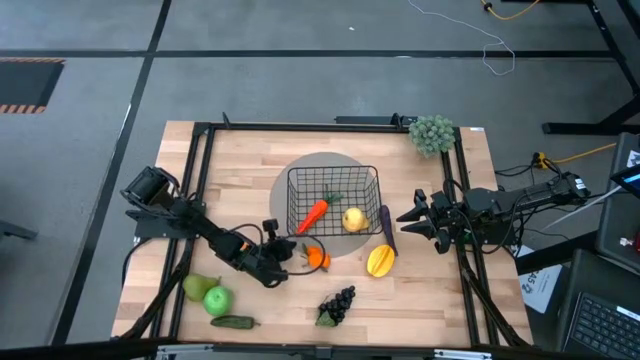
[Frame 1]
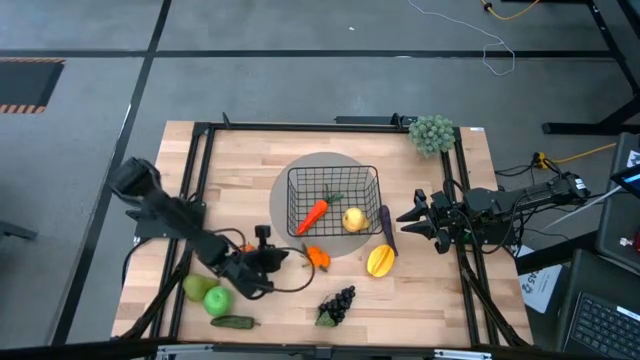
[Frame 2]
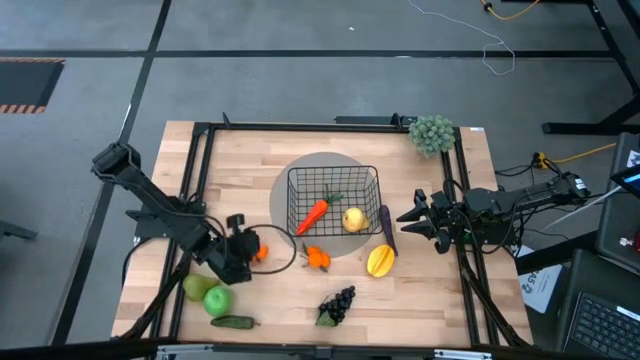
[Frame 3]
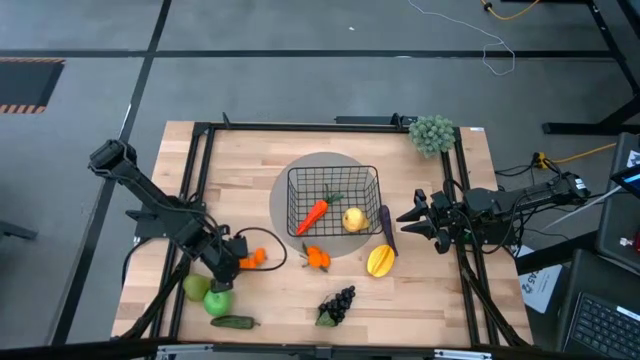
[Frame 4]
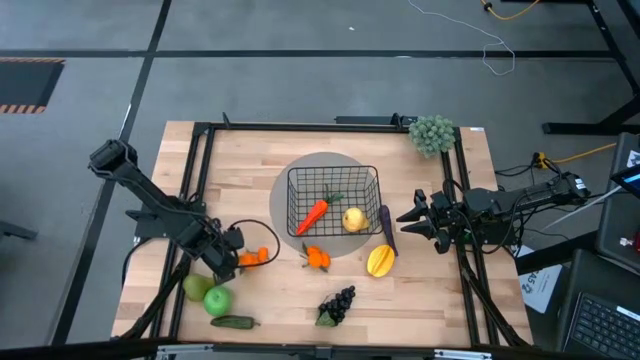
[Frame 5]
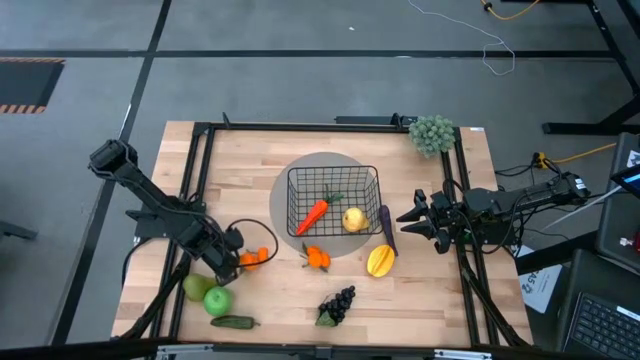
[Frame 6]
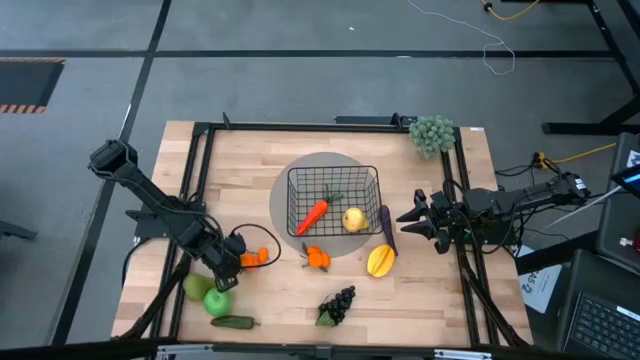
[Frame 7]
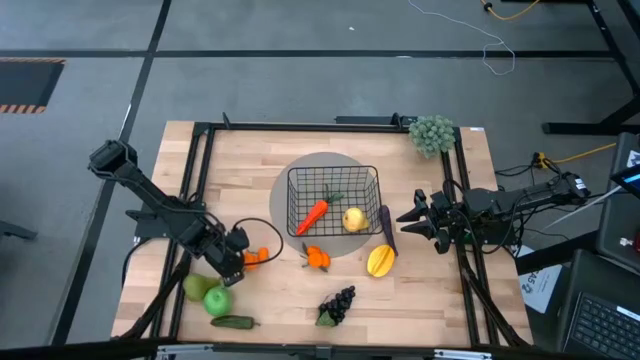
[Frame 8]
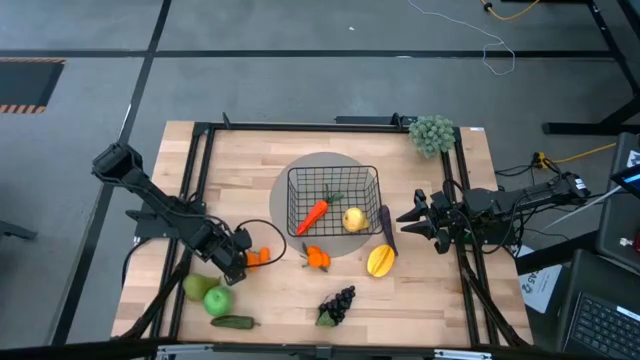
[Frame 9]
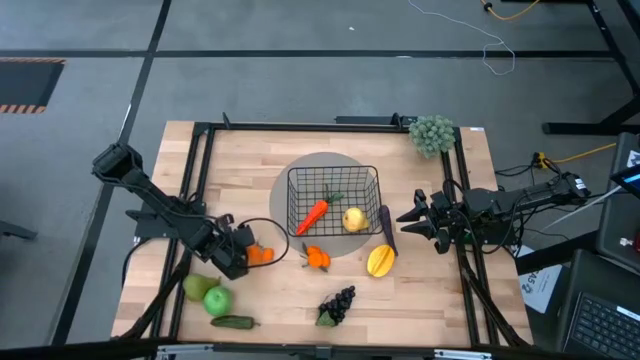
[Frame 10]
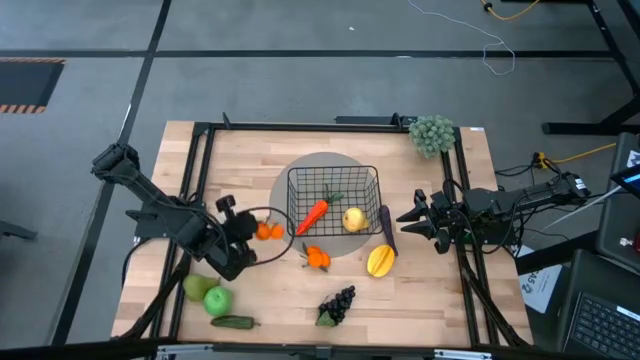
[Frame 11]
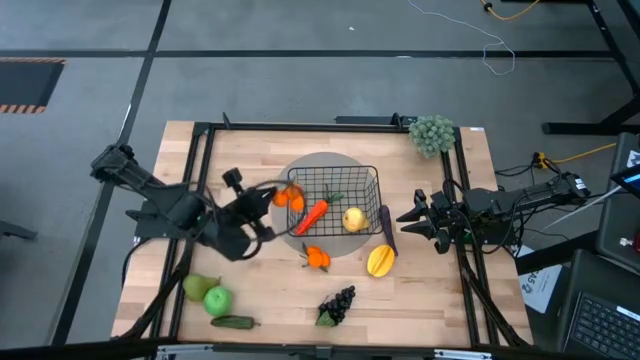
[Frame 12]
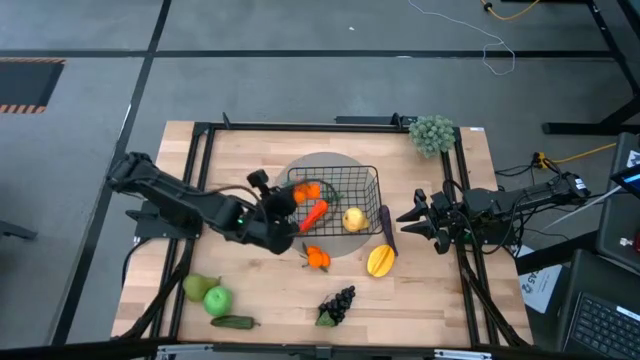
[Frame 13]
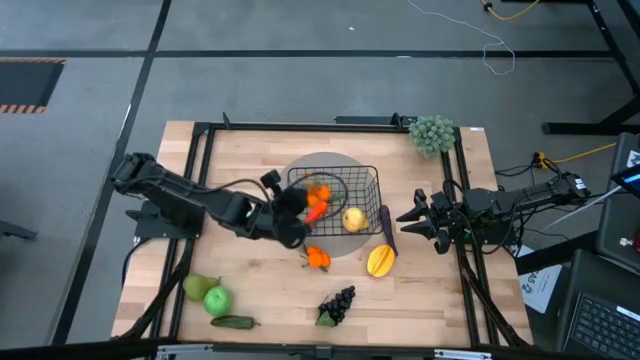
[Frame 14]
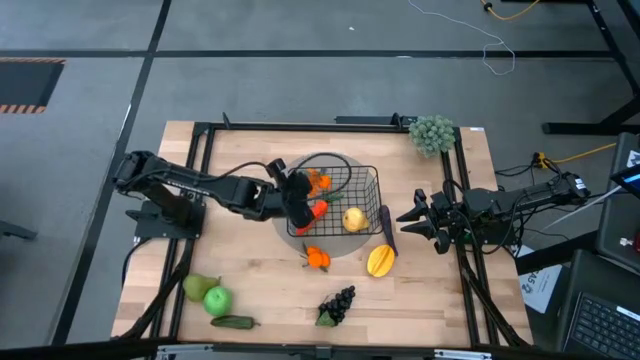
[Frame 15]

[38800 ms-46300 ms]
Task: Build produce basket
Put the left orange tangerines into the wire basket

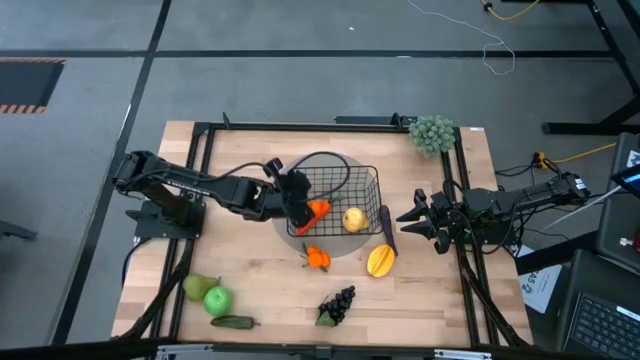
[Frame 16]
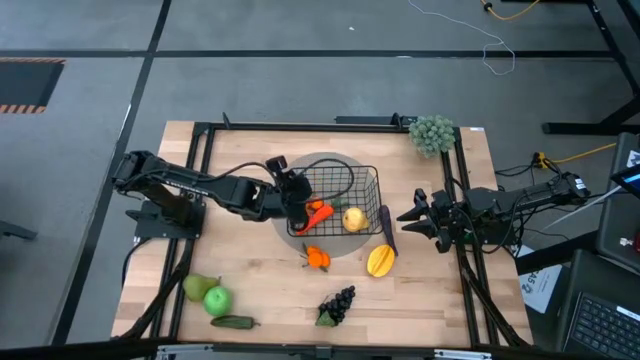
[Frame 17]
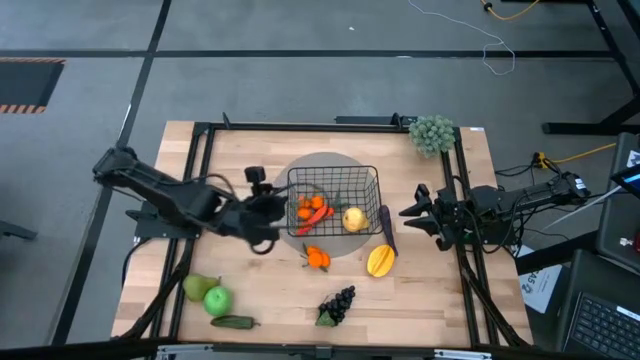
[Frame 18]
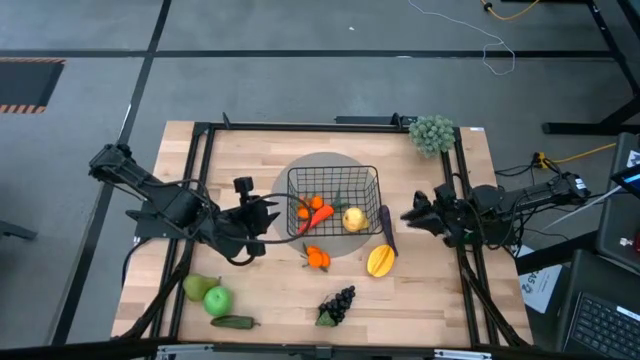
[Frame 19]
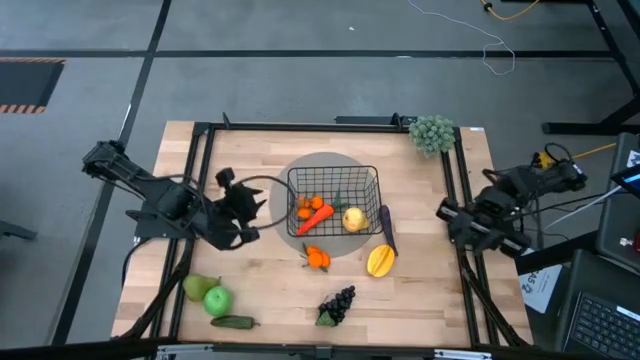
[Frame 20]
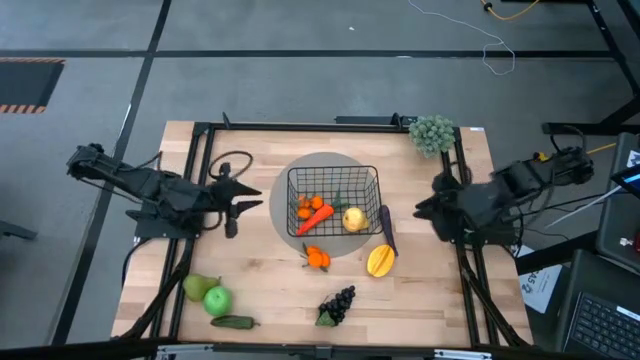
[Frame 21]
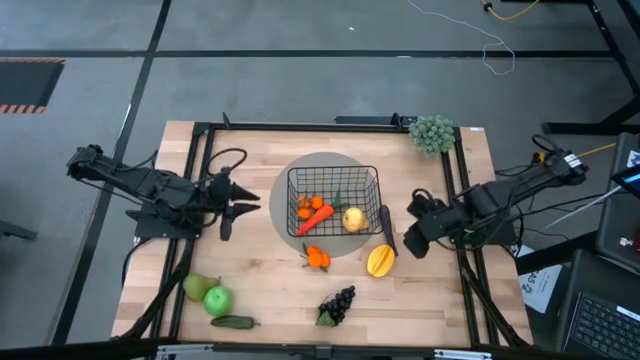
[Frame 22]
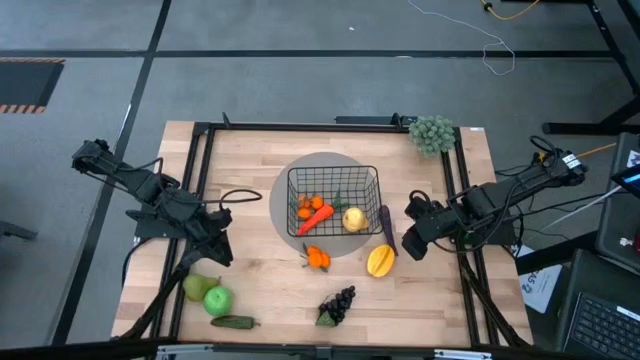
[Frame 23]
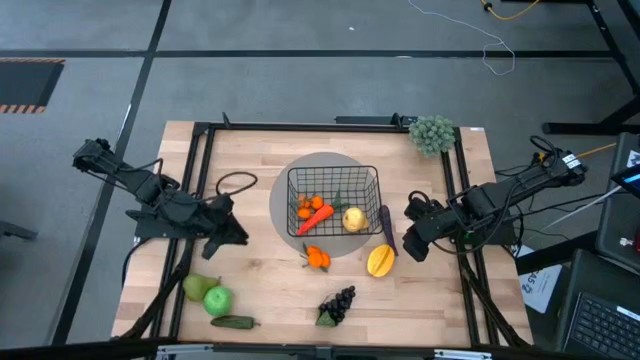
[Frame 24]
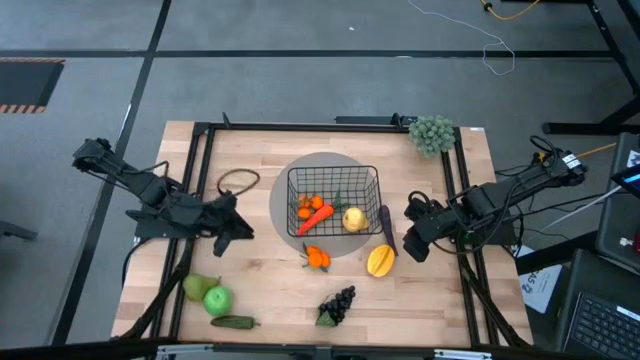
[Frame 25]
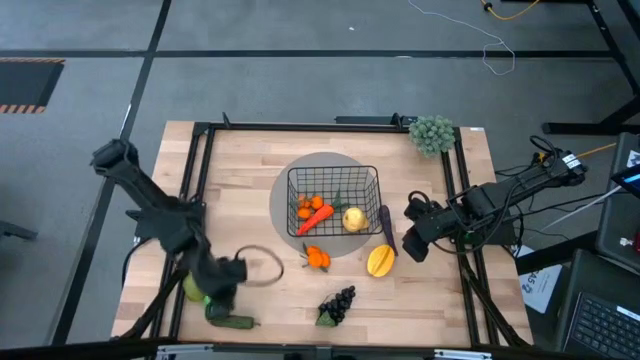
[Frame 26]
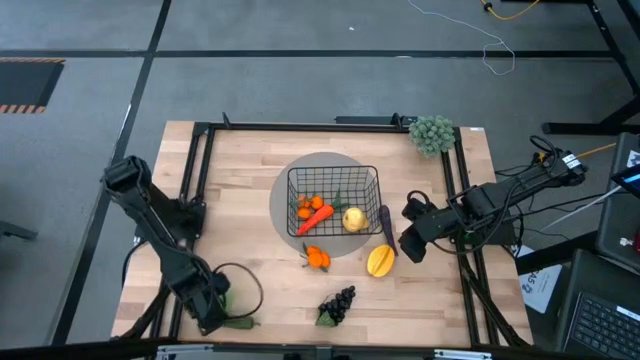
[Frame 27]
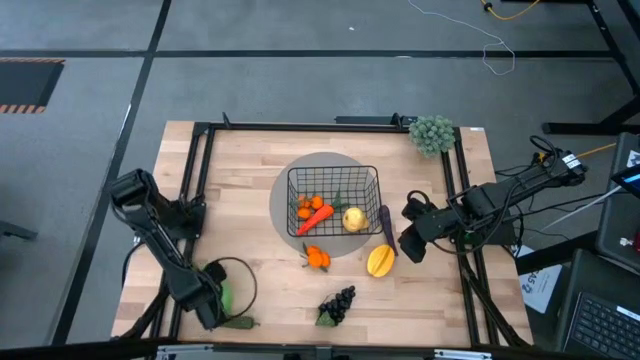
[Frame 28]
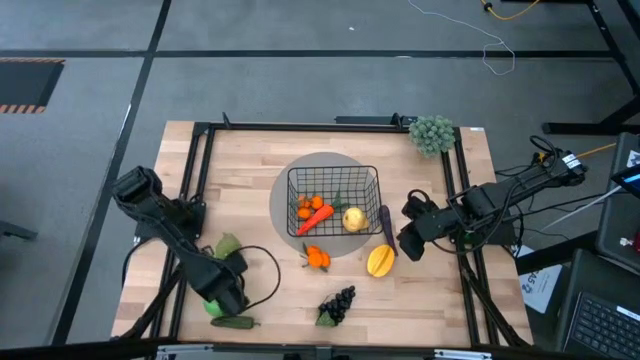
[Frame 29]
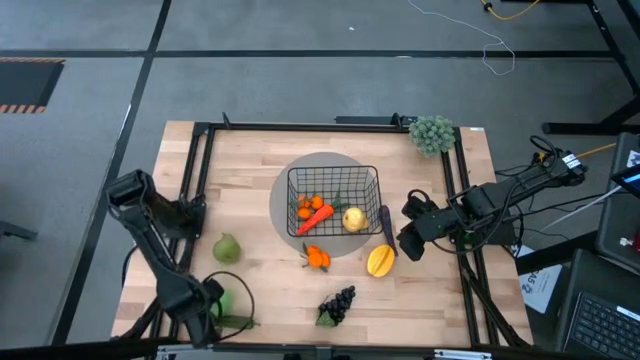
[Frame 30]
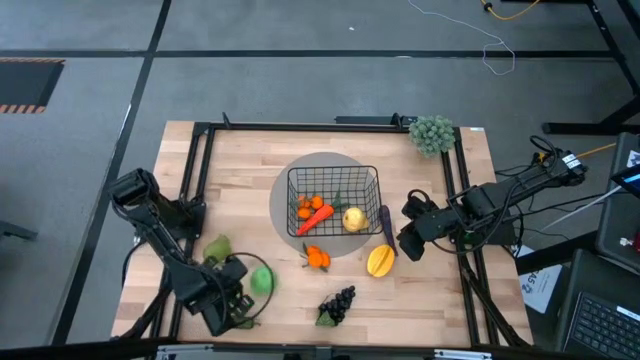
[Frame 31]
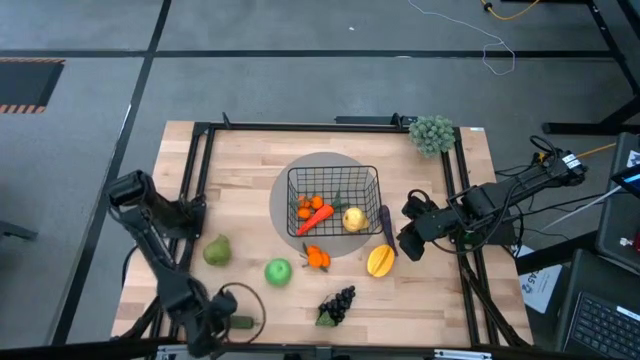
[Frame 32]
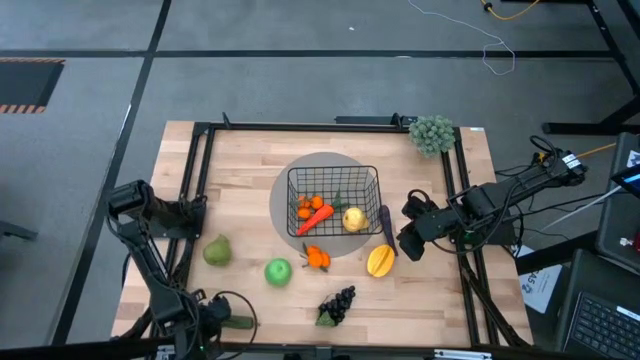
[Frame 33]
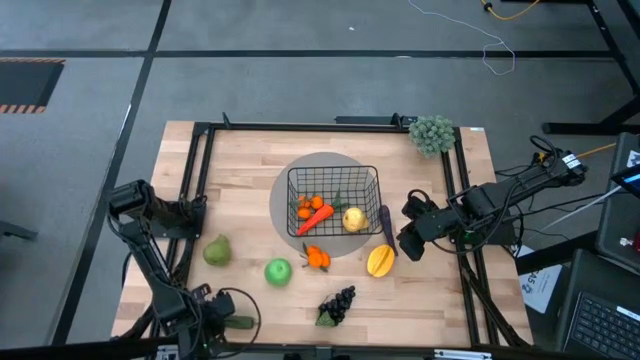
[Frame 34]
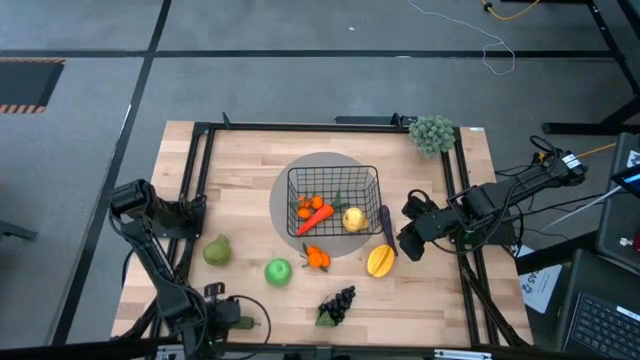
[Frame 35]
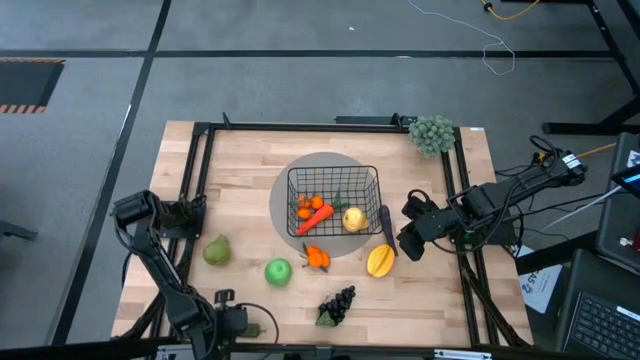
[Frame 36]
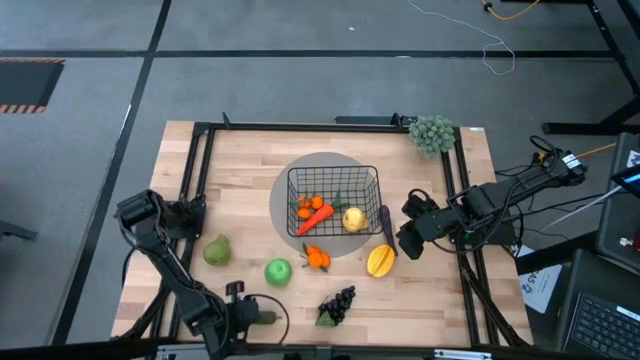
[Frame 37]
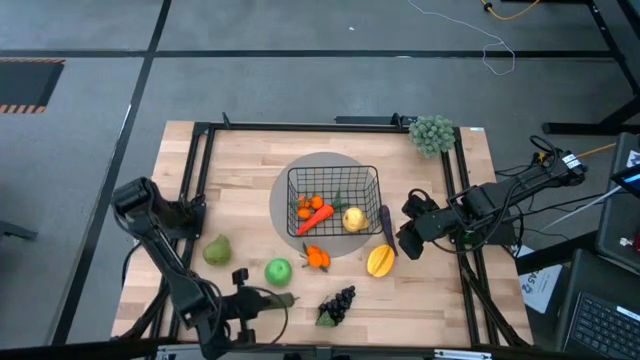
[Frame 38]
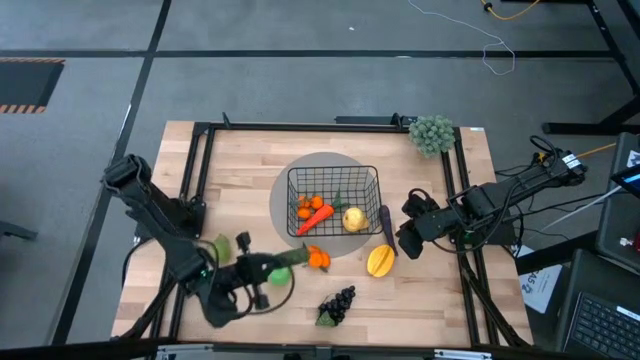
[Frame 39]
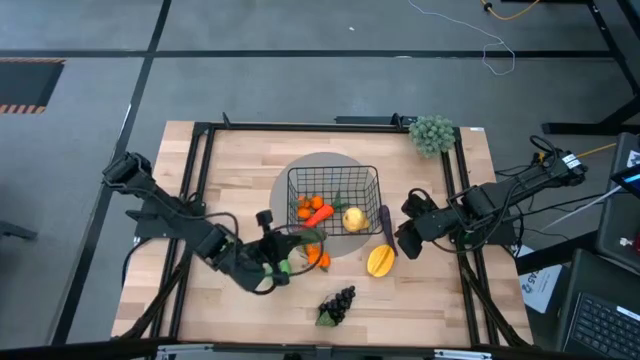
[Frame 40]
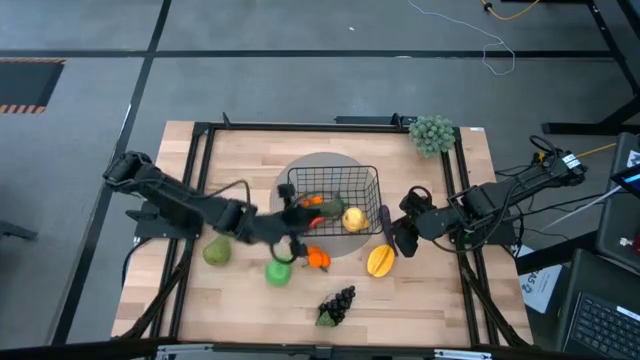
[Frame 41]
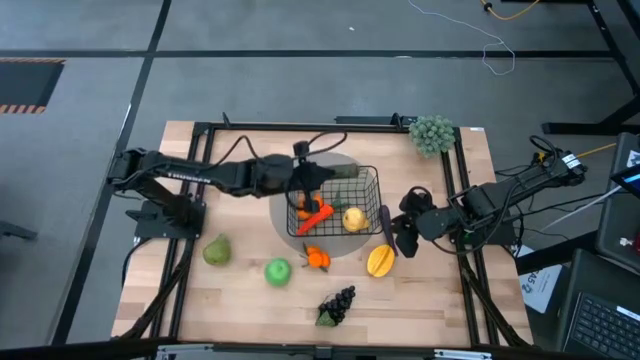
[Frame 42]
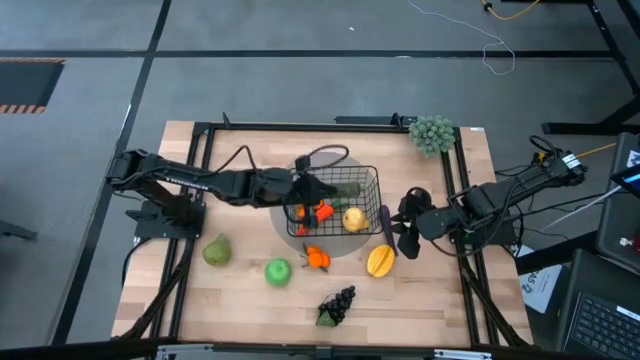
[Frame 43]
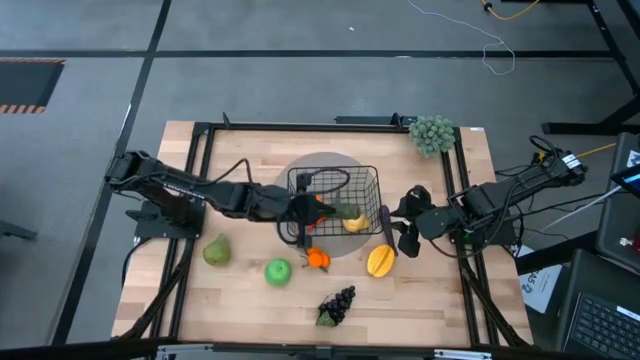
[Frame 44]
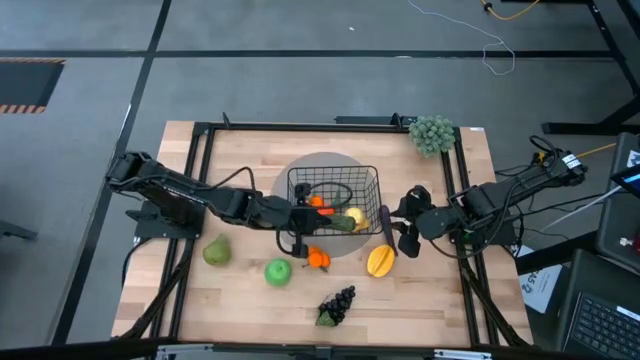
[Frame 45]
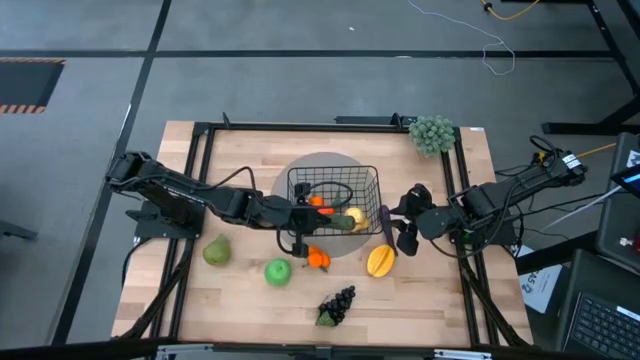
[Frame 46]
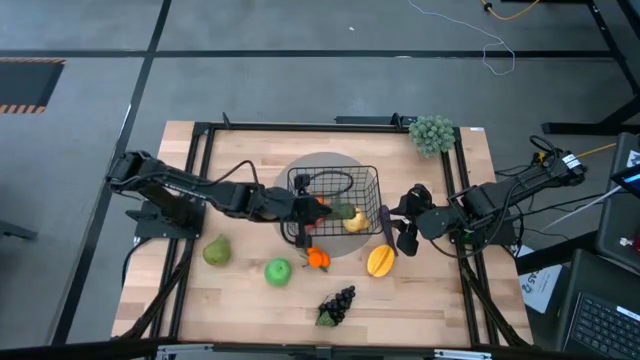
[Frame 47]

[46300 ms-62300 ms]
Put the green chili pepper into the wire basket
